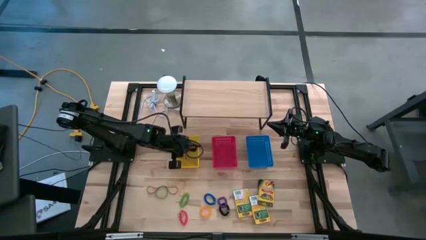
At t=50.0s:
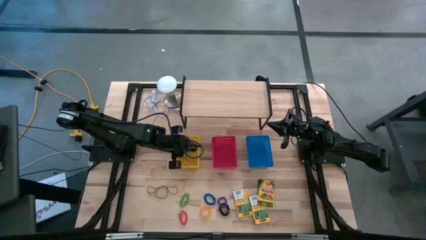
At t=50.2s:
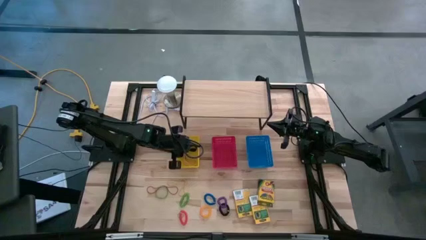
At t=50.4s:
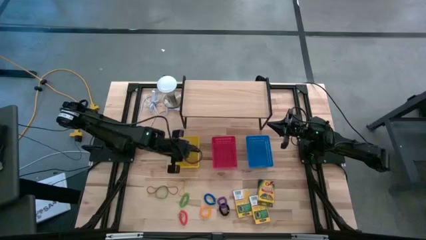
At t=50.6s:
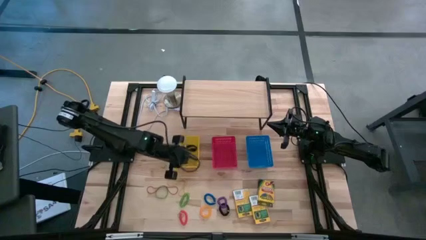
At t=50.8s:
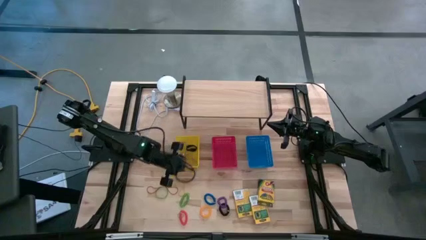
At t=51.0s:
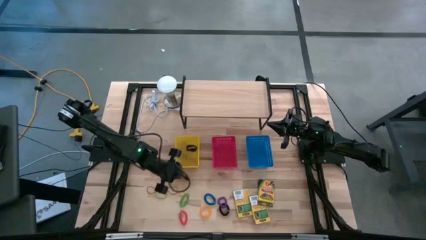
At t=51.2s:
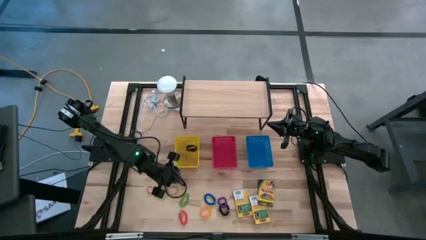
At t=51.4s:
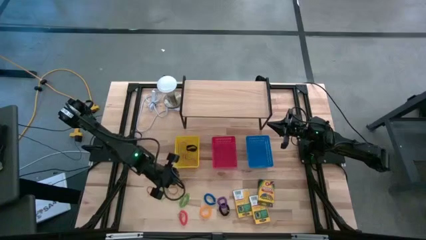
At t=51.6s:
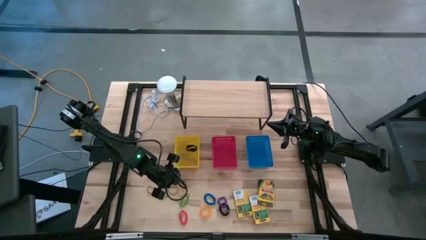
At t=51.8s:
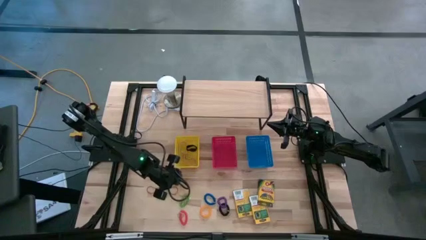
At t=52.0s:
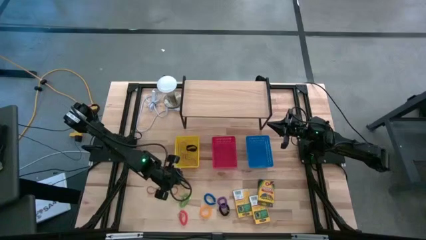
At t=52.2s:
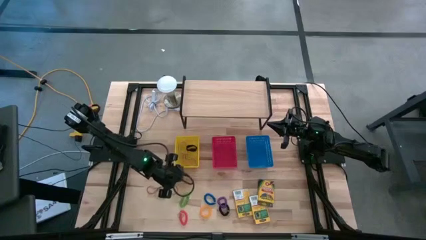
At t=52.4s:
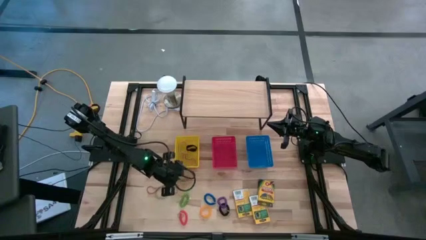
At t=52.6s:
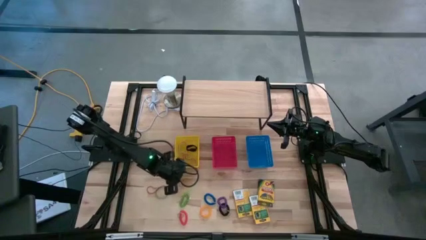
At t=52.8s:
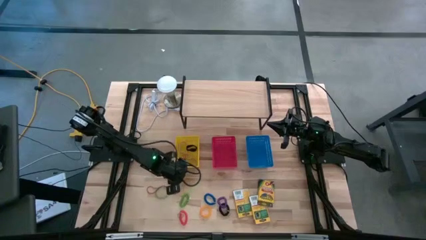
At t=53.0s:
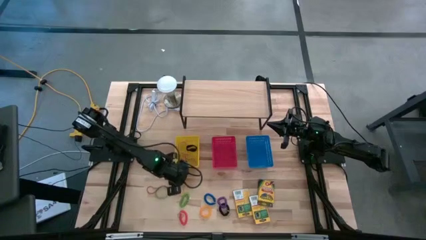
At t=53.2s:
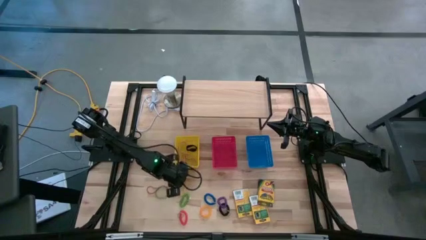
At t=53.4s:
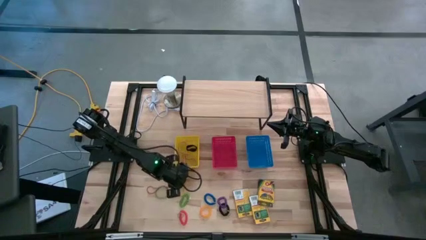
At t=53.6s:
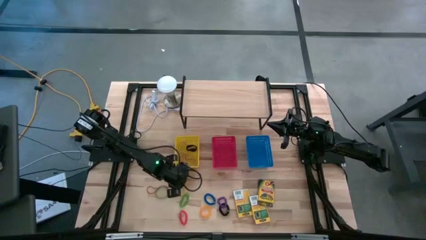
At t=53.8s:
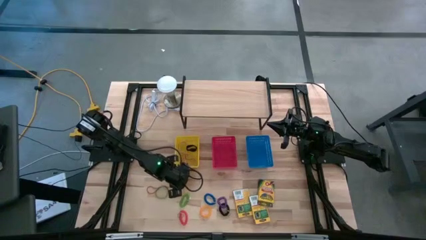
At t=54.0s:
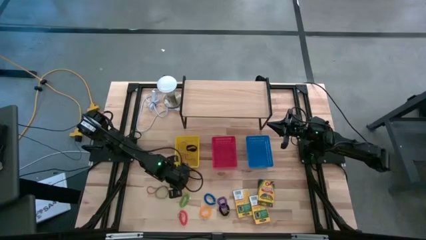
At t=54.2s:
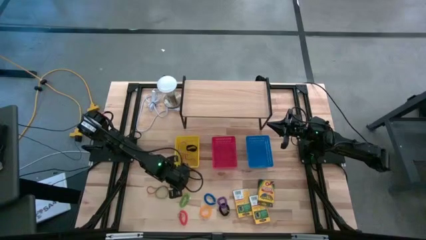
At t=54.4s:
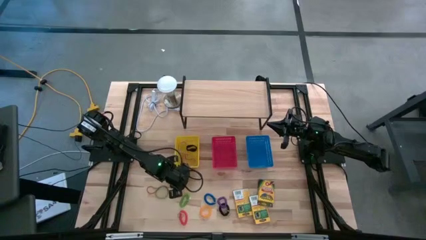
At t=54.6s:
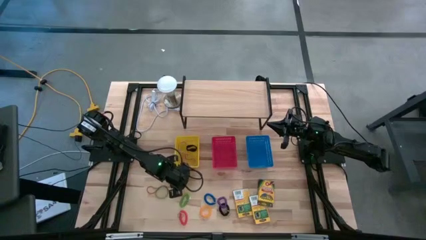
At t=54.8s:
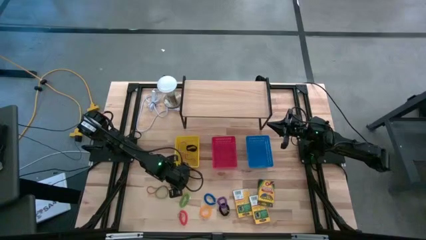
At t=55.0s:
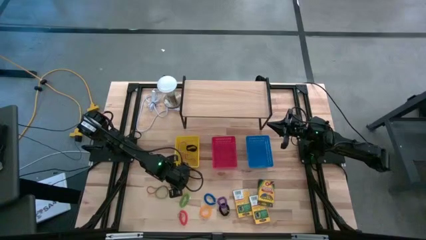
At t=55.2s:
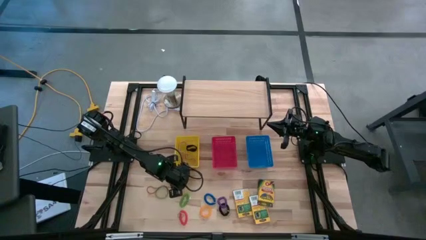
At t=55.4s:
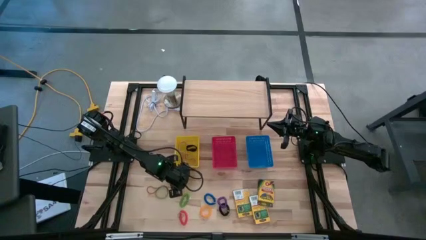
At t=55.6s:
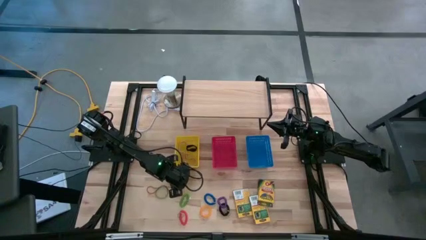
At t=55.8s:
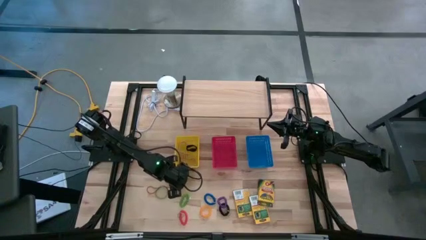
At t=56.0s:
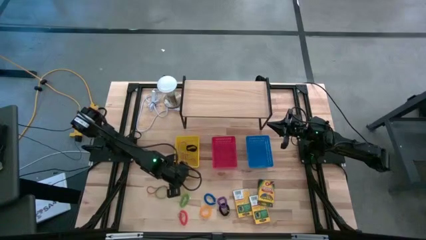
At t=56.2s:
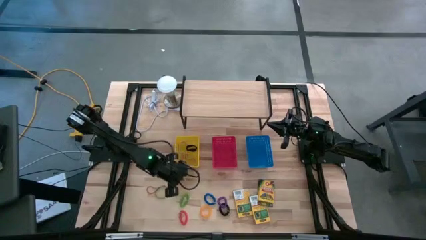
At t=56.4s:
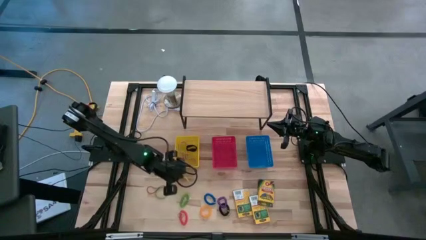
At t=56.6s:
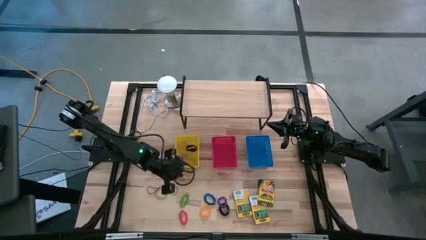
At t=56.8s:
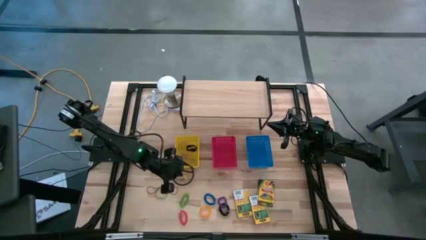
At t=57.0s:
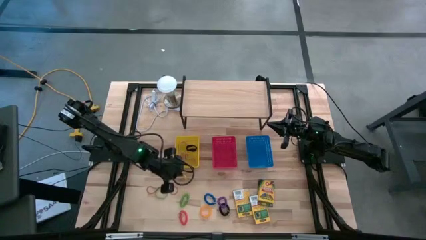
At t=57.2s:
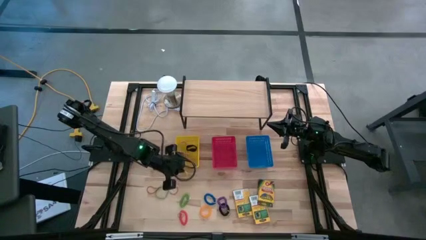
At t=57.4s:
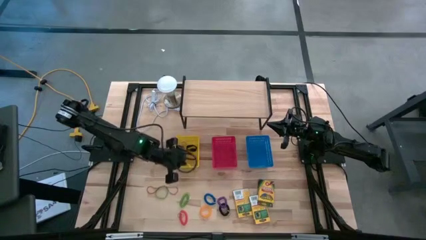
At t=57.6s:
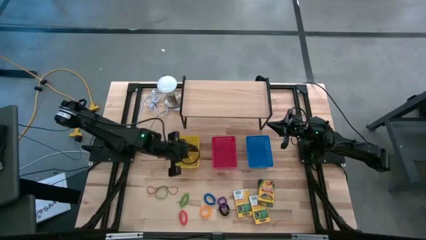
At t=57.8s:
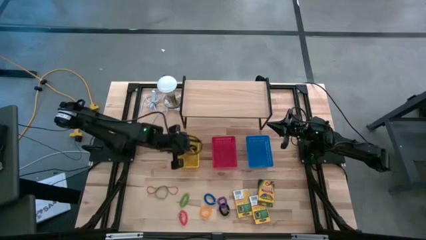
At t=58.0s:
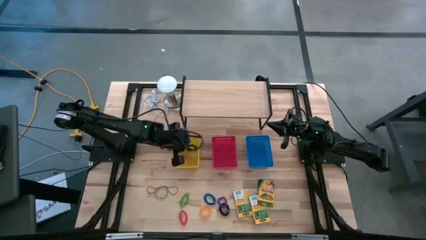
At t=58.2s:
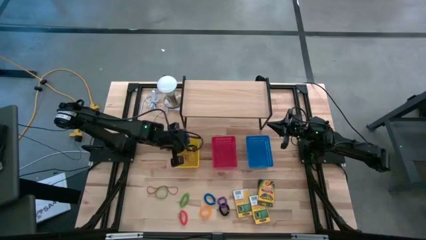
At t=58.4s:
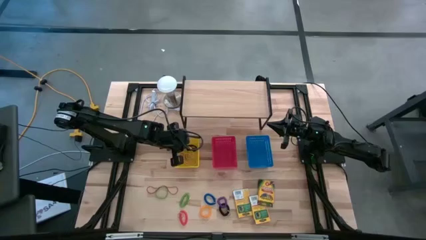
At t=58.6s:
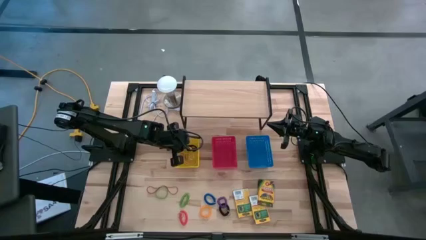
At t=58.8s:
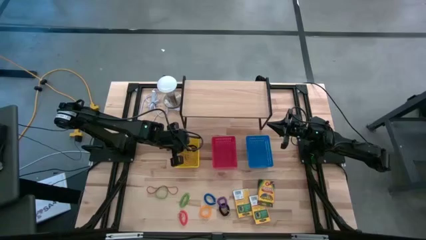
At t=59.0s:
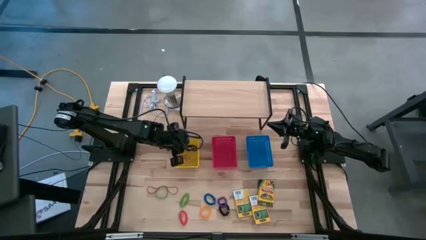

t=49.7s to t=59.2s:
Task: Pick & Place Office Desk Supplies
Put the yellow rubber band into the yellow bin

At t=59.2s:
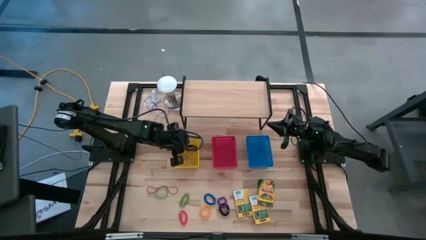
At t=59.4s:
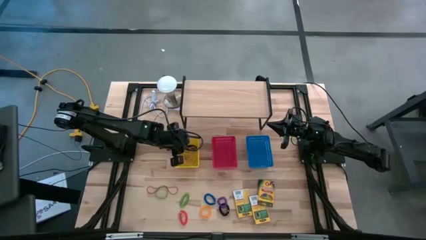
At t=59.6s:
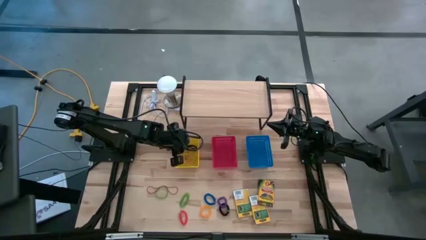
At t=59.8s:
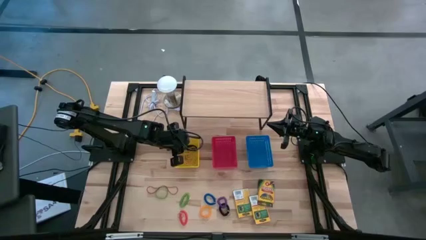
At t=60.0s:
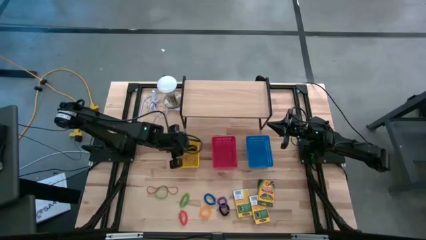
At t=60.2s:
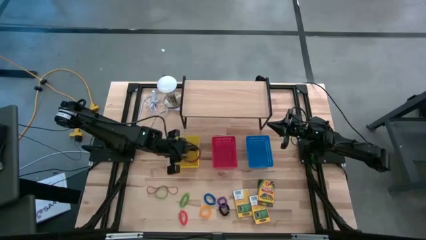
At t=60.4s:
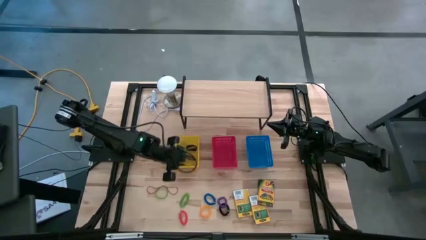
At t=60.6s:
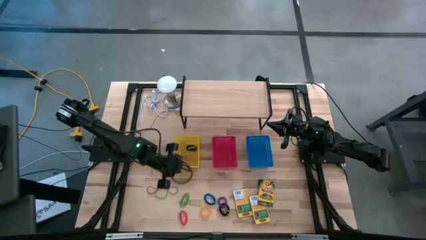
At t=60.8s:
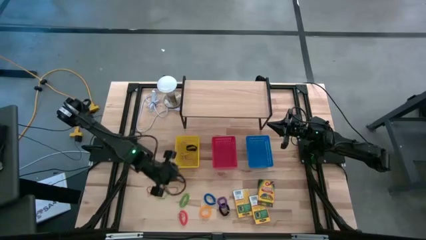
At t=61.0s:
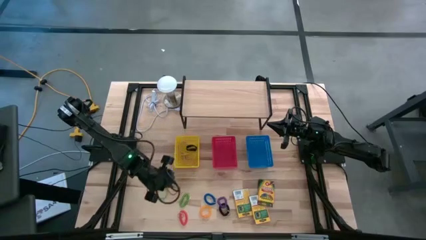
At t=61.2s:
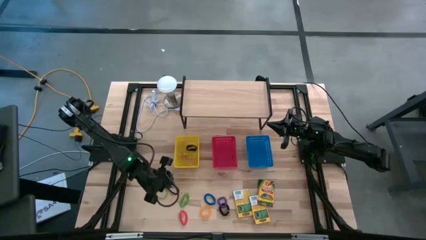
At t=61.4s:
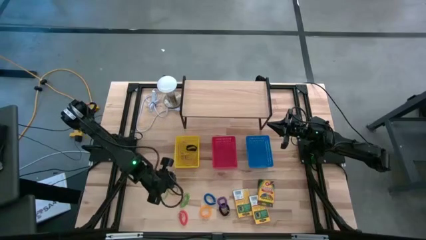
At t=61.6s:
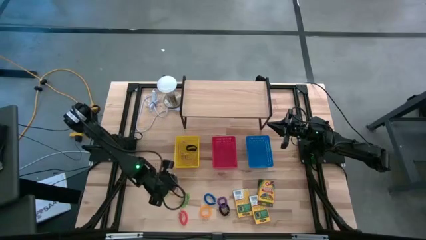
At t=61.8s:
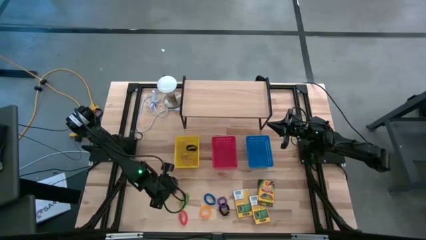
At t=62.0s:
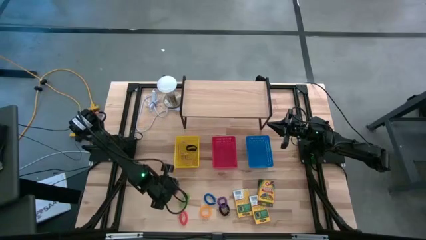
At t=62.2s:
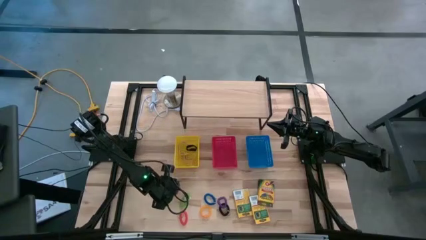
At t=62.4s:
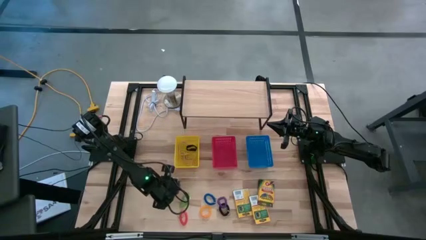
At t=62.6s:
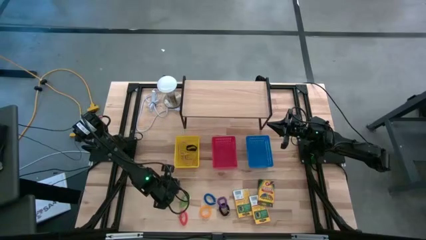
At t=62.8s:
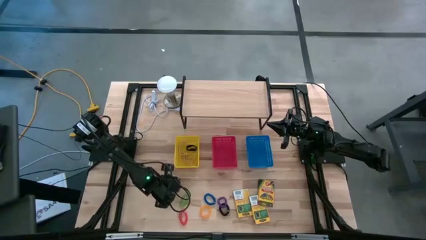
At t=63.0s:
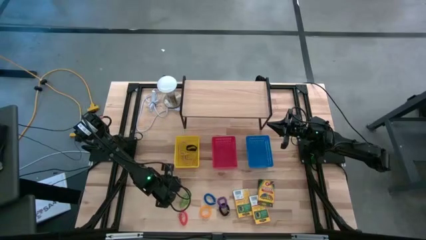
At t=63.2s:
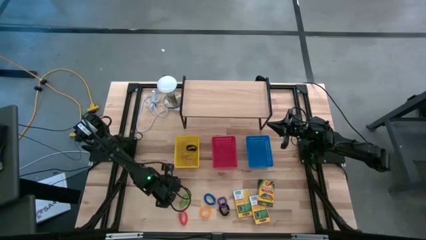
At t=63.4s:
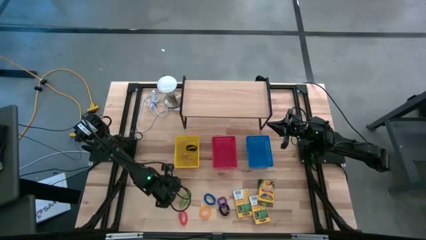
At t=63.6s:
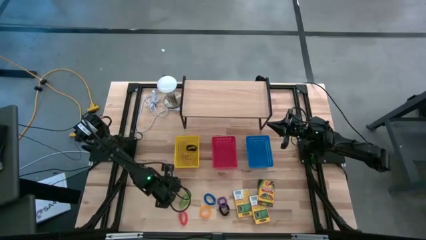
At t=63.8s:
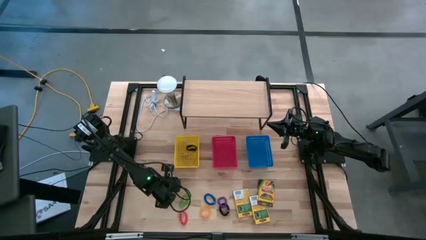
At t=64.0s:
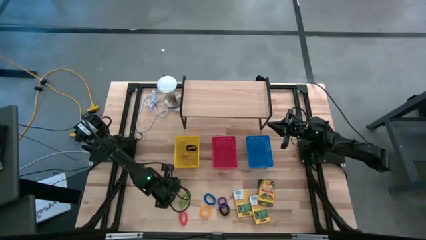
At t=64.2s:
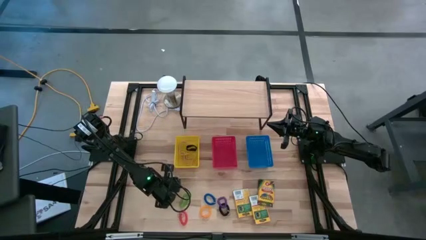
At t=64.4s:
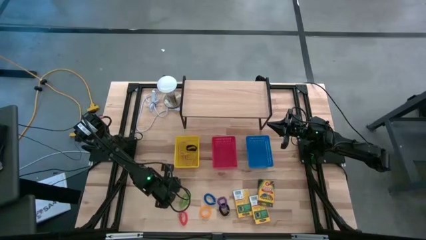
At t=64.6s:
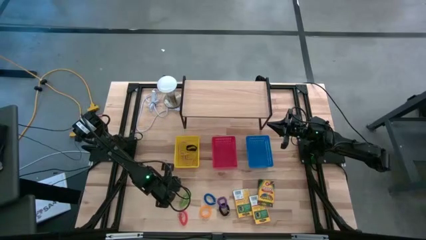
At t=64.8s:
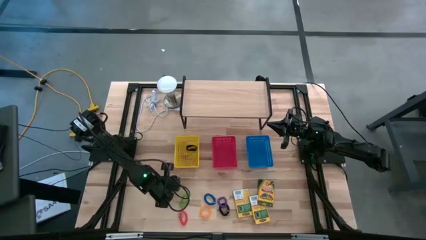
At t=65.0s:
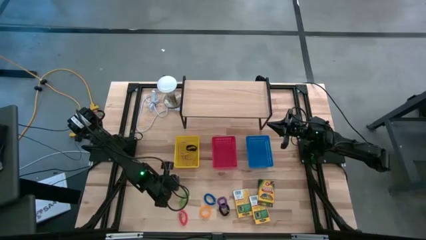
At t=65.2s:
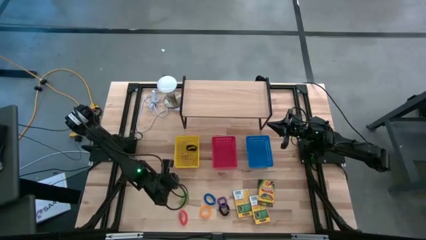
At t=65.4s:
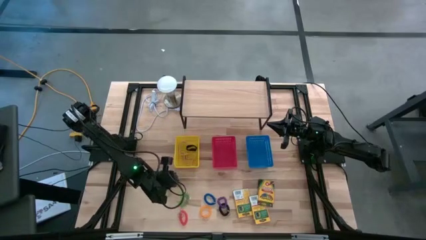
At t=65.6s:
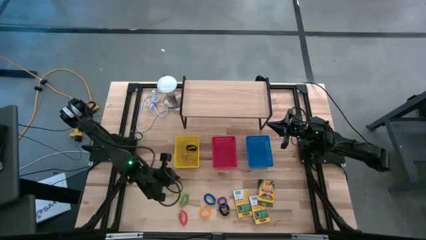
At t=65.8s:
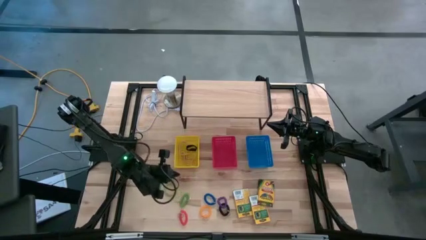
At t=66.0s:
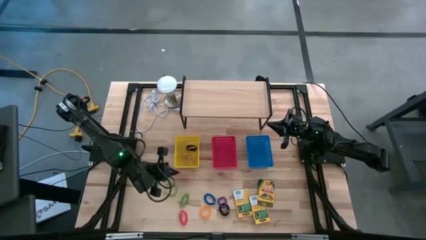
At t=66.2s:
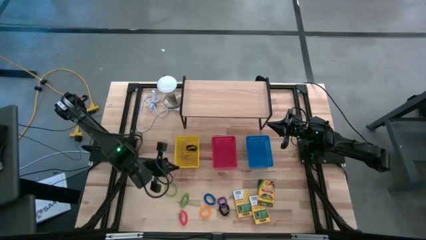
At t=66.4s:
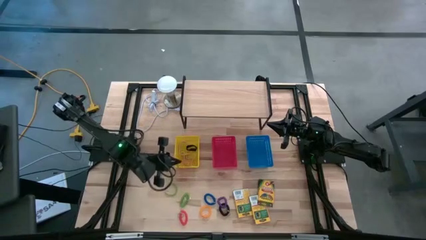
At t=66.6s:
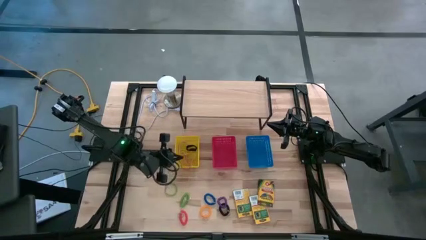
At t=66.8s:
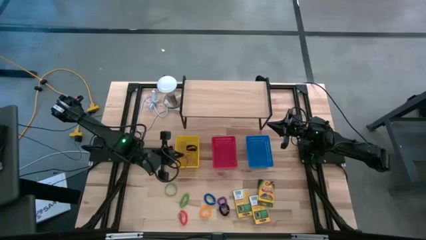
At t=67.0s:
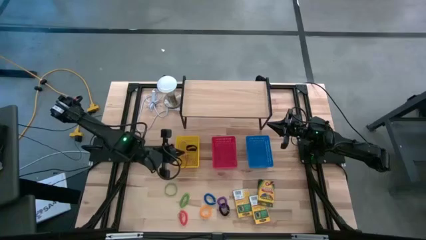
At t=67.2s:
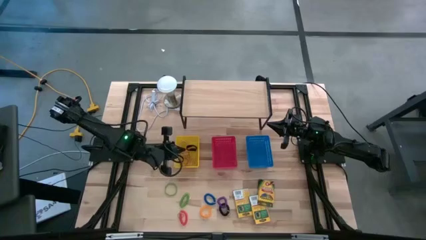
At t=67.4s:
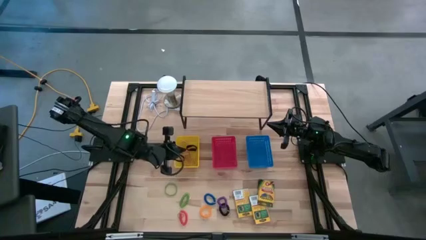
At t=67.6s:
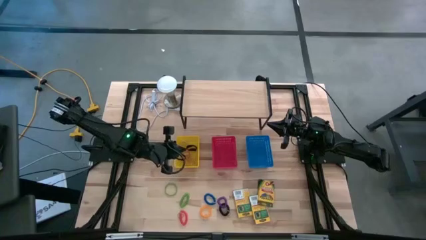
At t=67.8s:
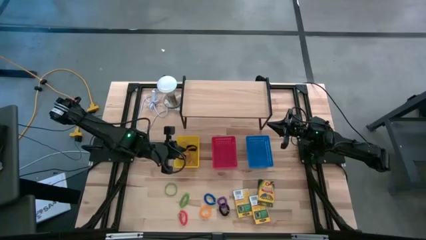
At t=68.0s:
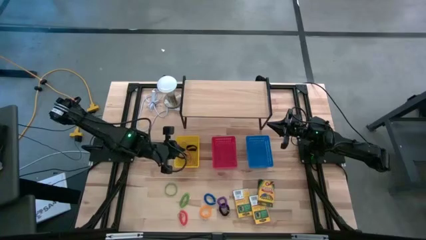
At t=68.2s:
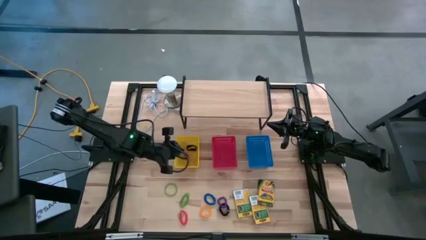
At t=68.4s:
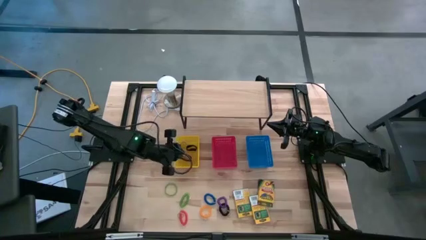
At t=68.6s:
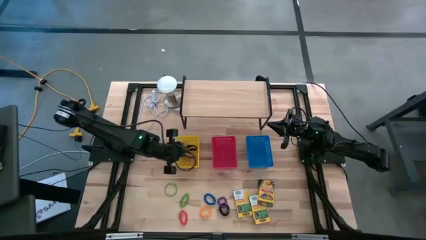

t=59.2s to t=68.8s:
Put the red rubber band into the yellow bin
